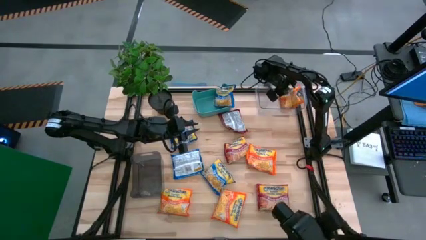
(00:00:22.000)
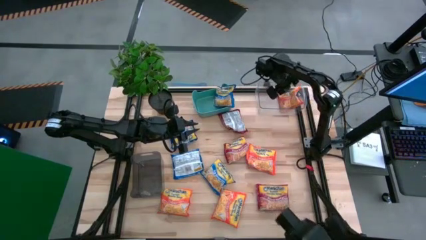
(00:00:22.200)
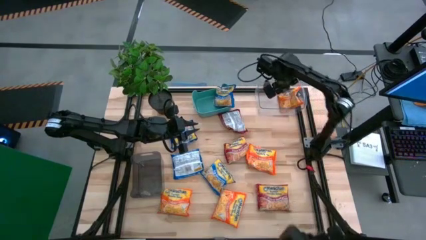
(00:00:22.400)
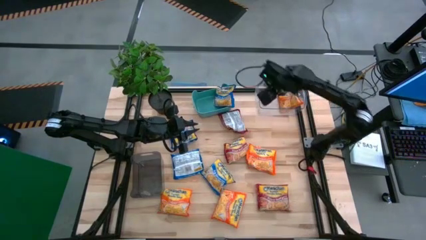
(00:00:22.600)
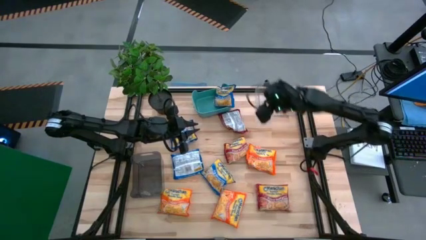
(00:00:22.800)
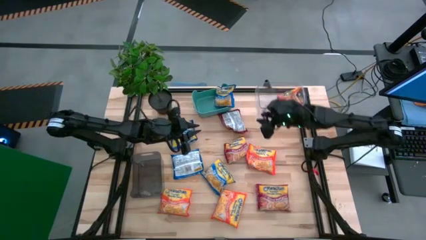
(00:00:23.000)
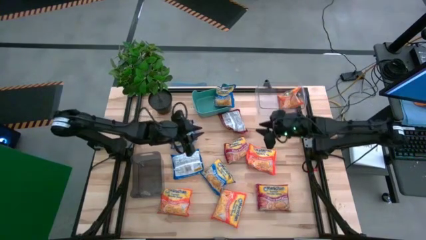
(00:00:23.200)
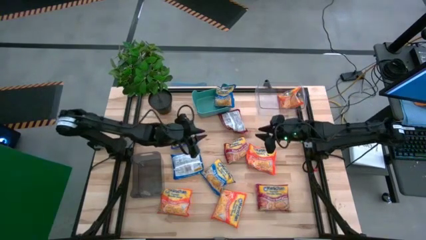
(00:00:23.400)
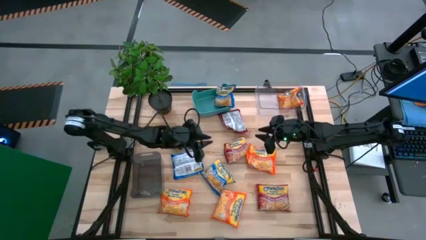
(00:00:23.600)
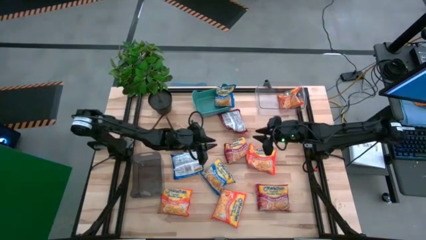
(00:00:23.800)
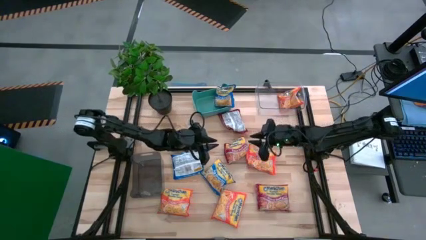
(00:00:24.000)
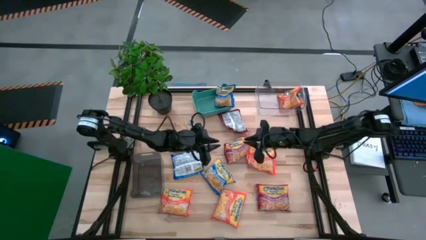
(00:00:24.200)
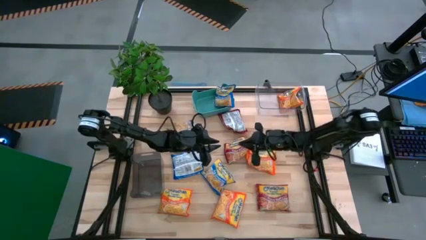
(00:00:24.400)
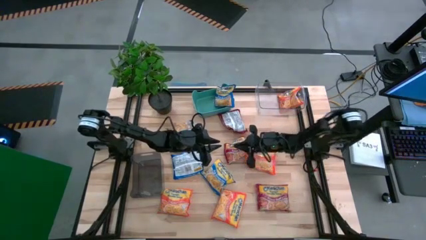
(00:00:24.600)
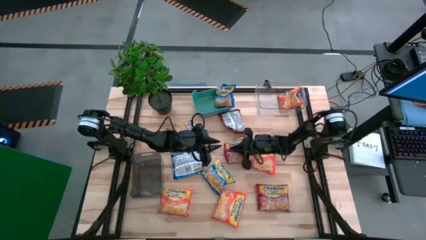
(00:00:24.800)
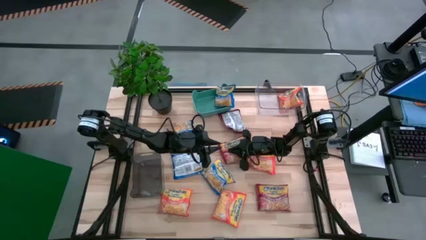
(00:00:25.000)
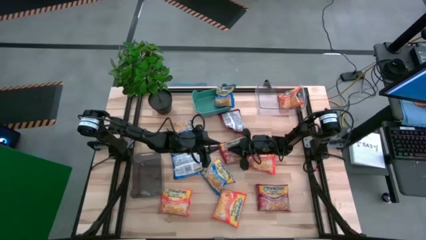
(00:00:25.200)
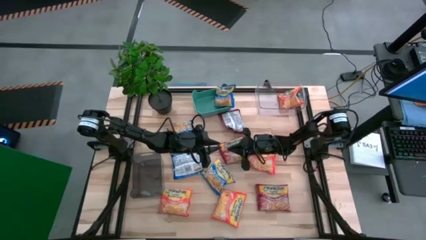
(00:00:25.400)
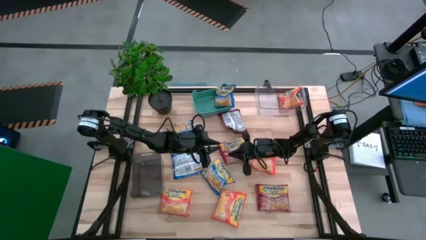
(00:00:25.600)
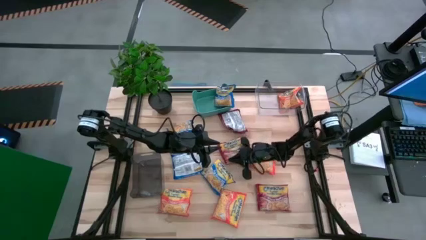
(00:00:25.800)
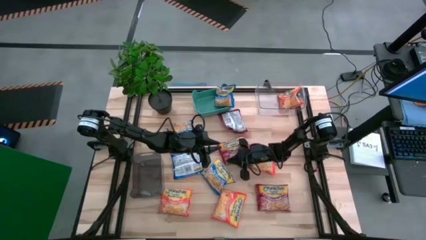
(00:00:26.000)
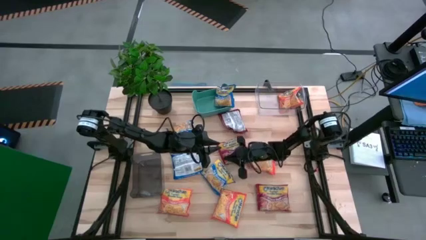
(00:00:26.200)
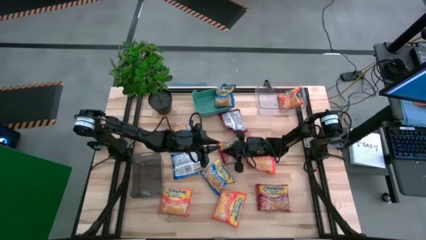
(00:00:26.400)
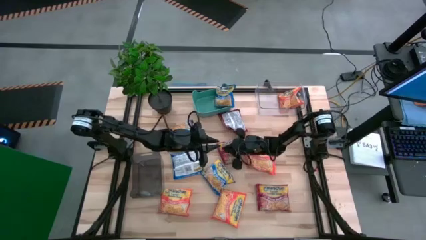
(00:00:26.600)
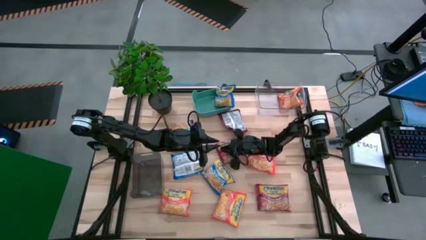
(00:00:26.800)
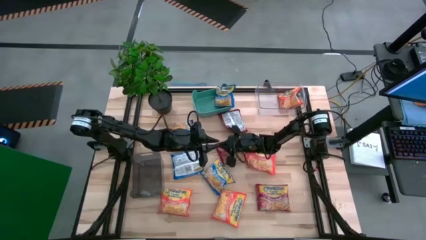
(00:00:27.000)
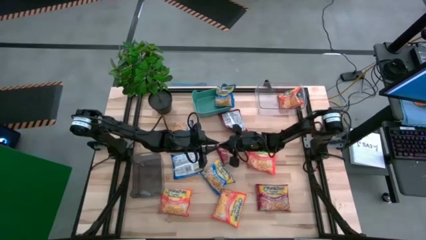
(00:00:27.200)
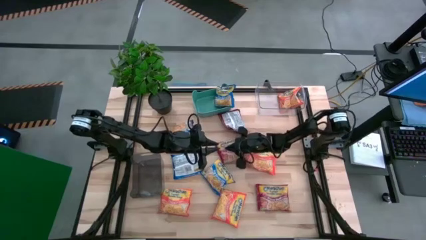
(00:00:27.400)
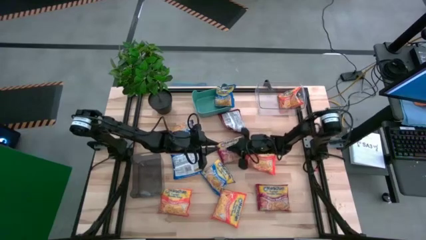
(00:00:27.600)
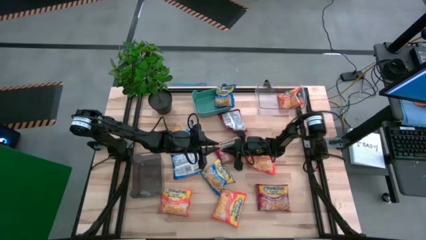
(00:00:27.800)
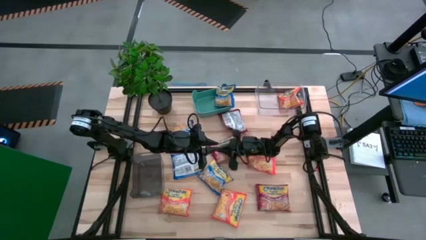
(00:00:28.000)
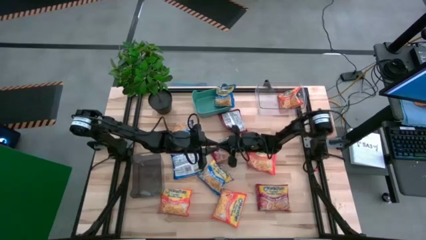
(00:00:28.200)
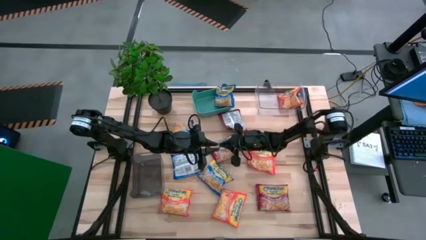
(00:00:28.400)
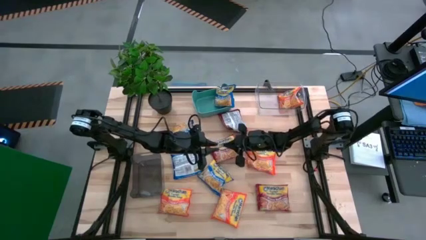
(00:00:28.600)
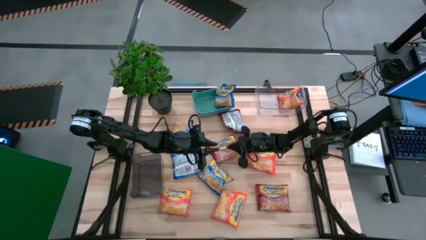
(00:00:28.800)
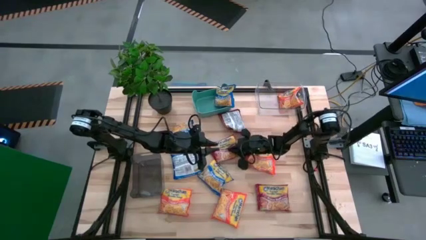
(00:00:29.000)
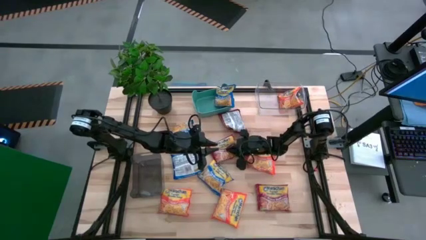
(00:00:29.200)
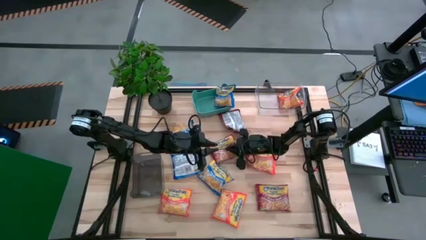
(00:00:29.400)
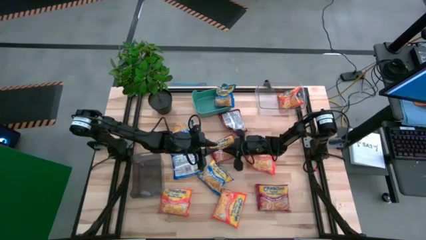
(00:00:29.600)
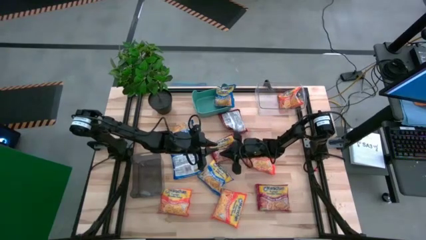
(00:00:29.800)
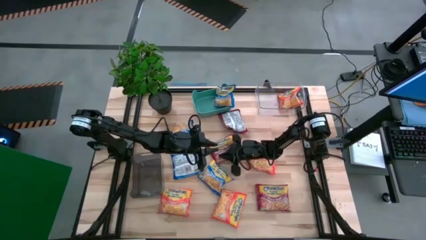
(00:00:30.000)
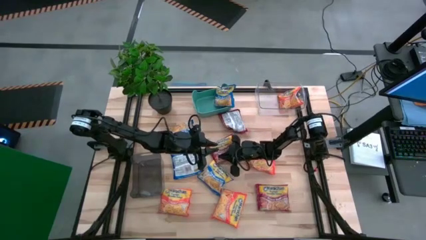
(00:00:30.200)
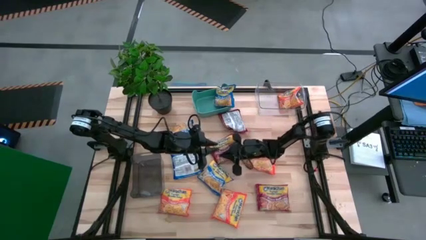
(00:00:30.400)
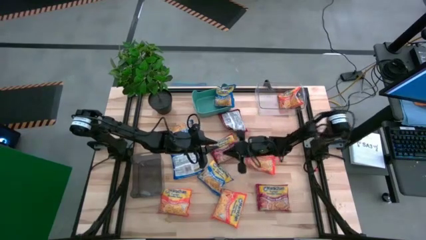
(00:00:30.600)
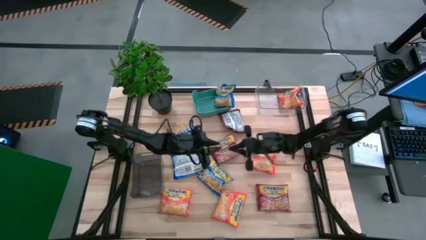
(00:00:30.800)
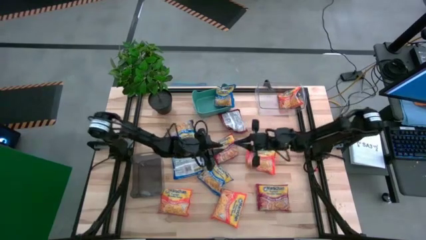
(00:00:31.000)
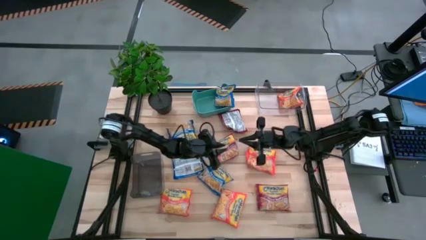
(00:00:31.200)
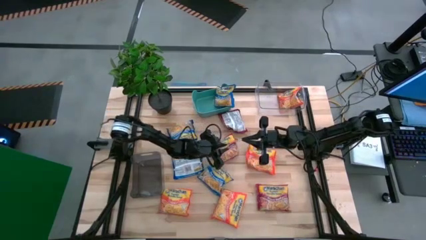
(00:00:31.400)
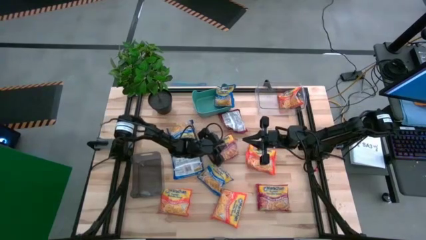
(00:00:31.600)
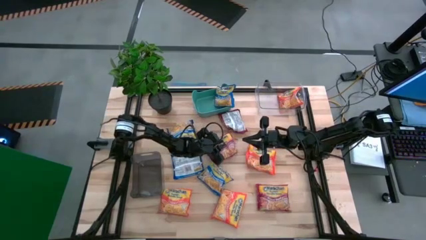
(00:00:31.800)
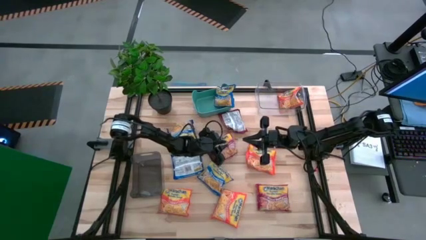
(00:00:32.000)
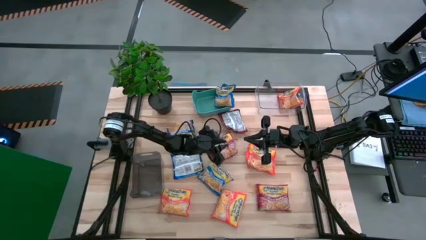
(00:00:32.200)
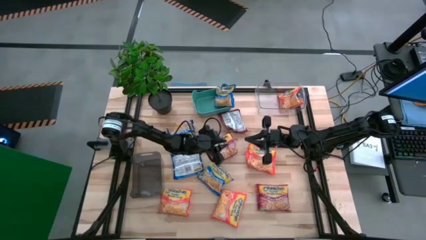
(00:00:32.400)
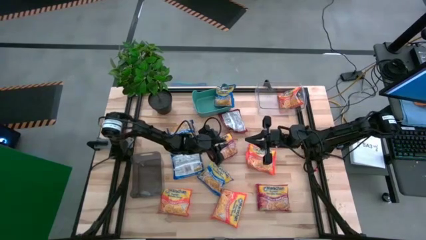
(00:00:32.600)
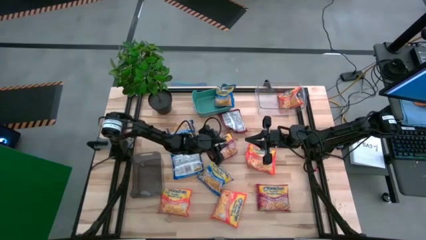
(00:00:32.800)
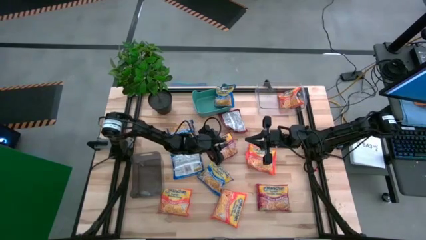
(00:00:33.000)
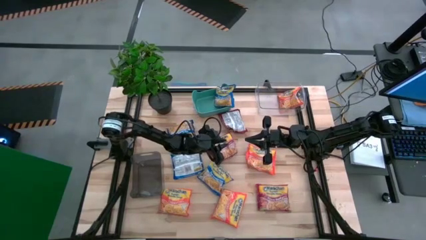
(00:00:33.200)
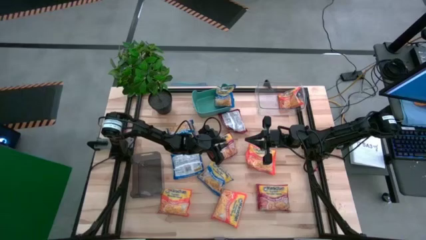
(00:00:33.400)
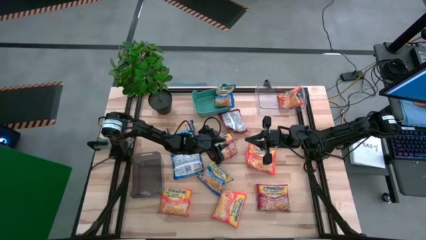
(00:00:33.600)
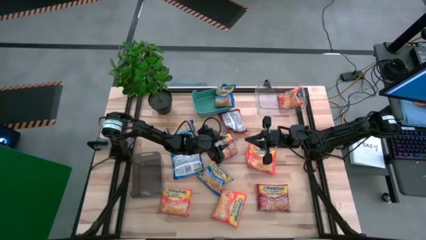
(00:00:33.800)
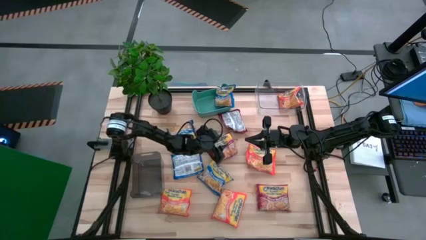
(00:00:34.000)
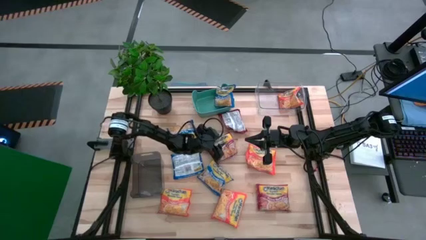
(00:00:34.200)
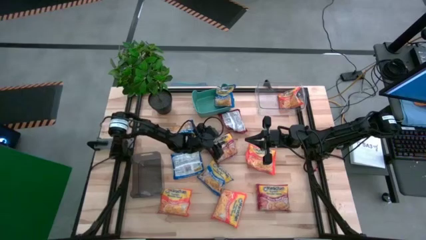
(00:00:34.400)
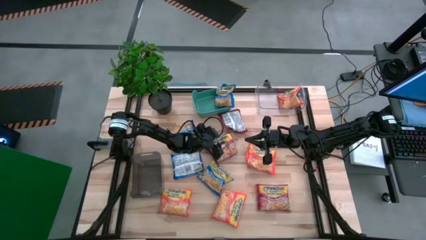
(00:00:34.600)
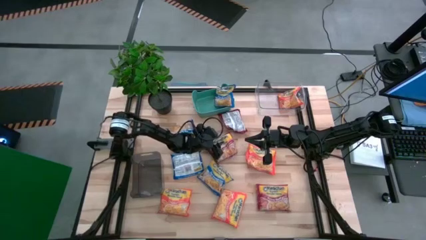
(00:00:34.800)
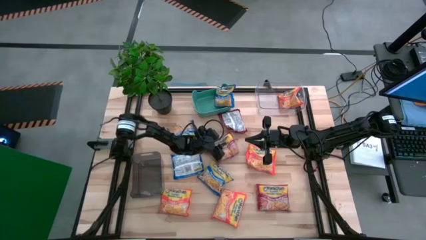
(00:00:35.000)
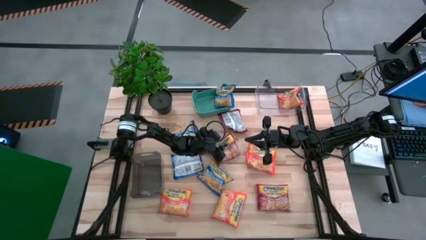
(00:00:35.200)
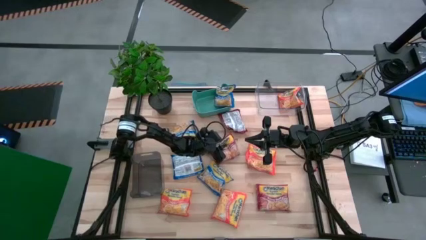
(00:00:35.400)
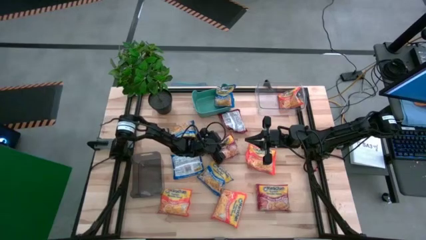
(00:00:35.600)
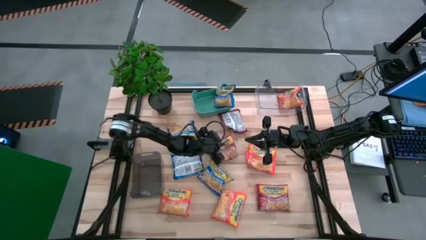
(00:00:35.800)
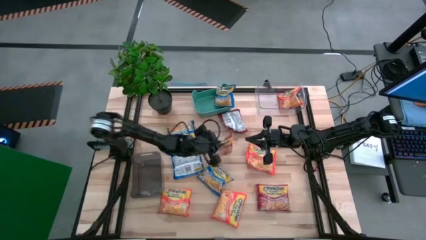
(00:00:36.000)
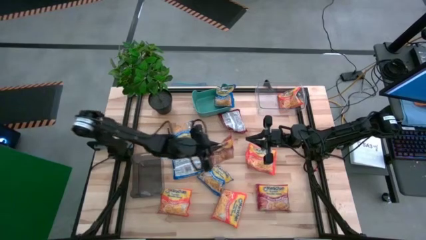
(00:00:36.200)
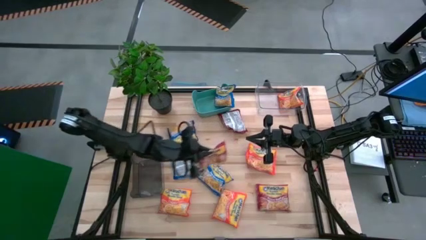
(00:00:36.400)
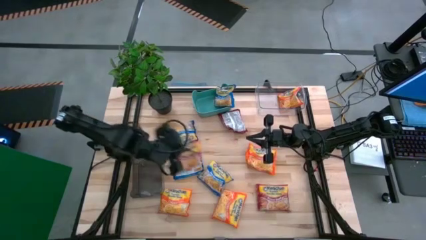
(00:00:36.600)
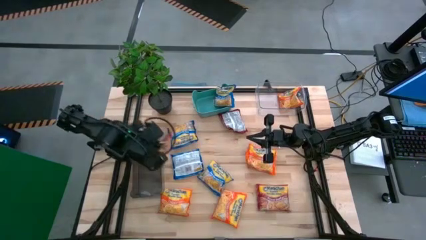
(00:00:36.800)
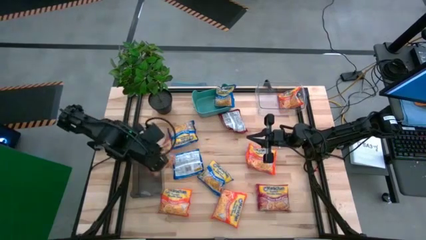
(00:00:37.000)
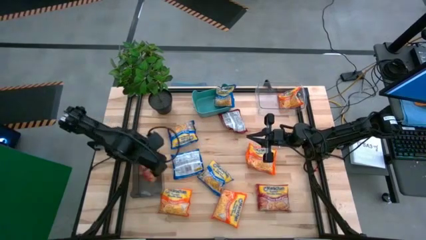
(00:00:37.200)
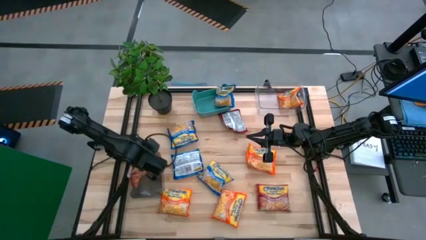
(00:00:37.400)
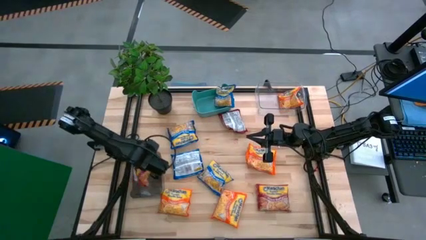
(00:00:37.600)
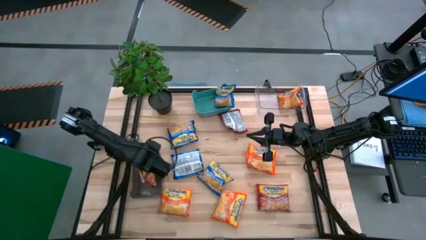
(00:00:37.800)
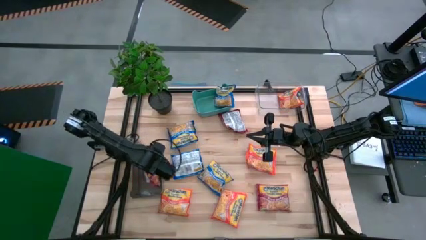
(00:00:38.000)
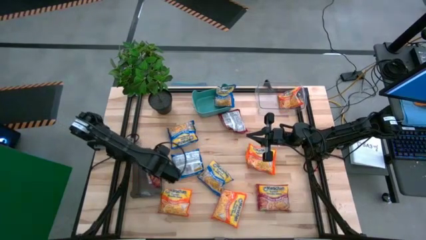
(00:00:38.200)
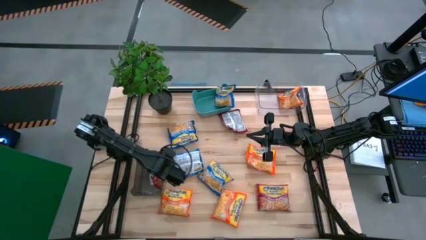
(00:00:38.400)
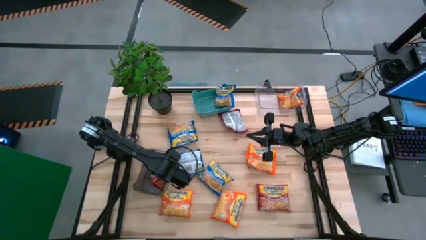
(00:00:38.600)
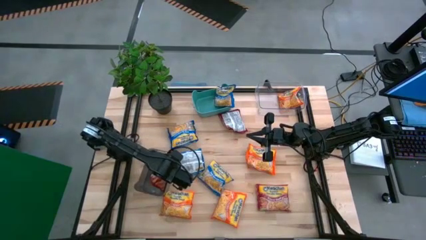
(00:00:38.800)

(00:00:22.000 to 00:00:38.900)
Task: Sort Maruchan noodles
Put the middle red noodle pack into the black bin
